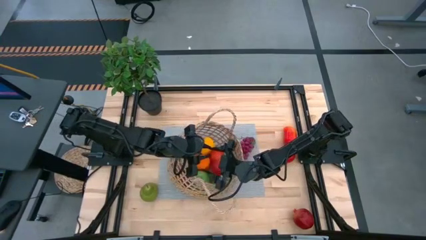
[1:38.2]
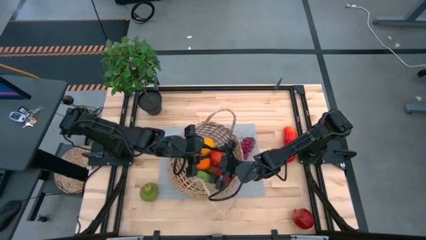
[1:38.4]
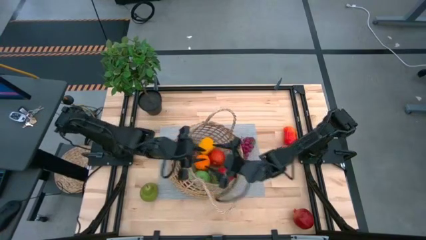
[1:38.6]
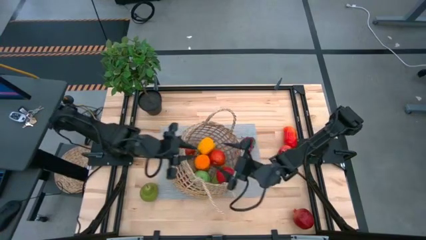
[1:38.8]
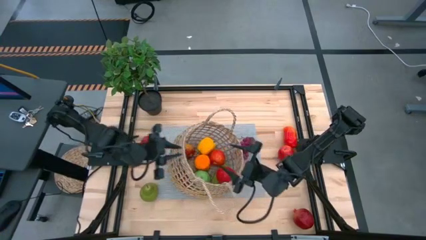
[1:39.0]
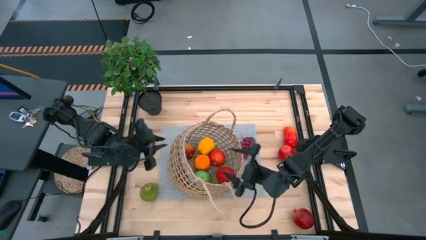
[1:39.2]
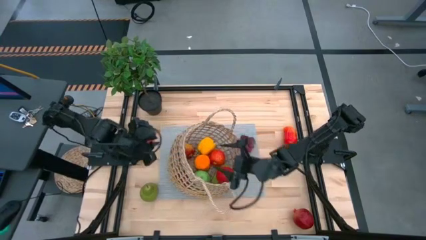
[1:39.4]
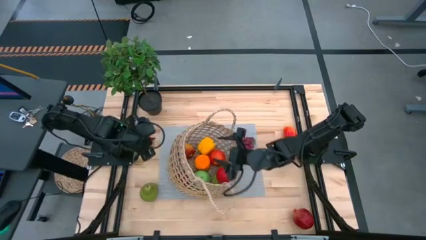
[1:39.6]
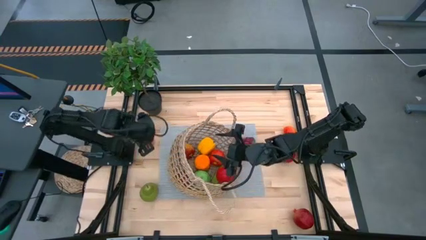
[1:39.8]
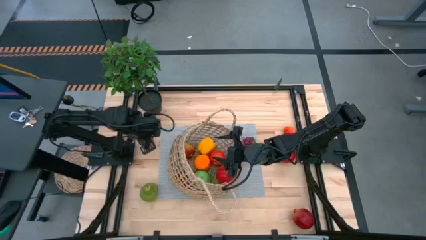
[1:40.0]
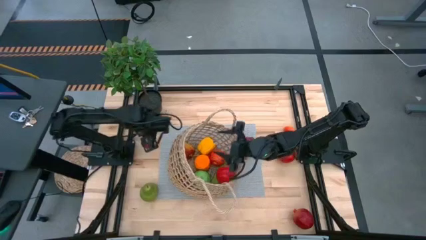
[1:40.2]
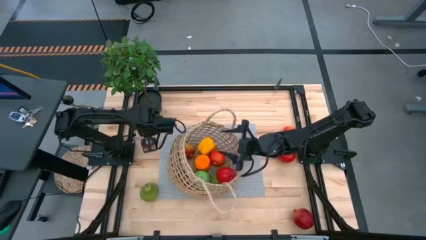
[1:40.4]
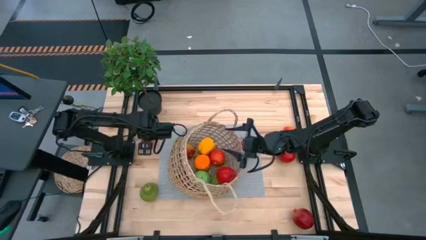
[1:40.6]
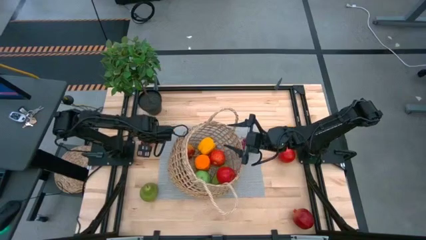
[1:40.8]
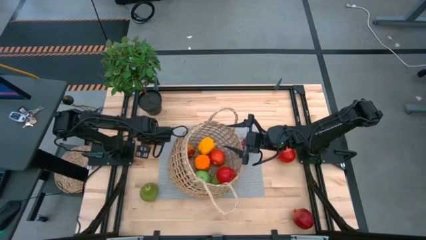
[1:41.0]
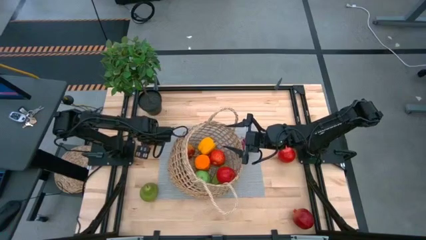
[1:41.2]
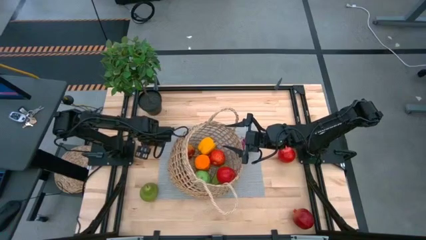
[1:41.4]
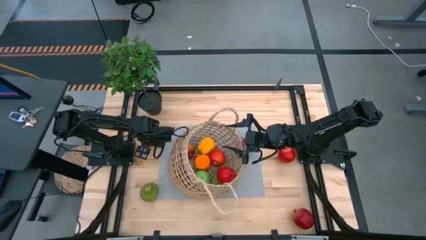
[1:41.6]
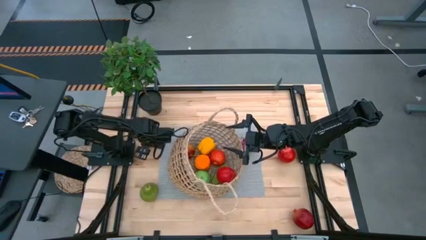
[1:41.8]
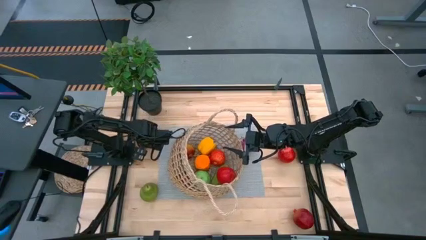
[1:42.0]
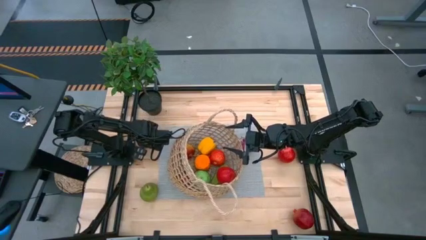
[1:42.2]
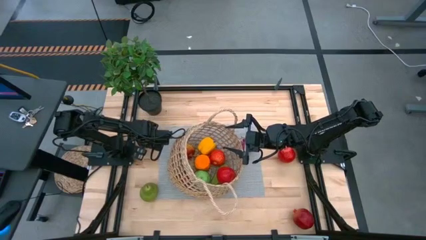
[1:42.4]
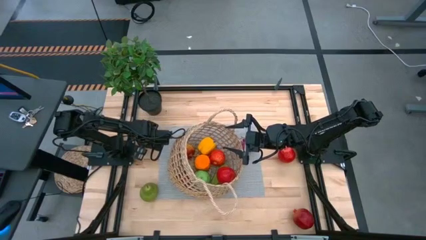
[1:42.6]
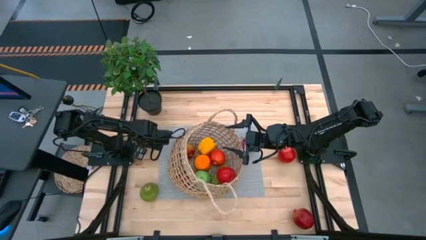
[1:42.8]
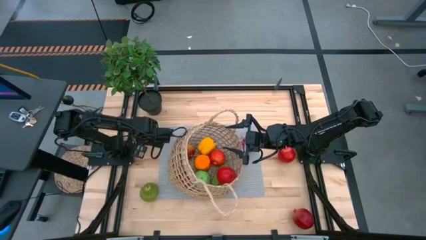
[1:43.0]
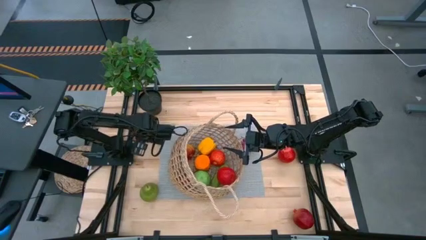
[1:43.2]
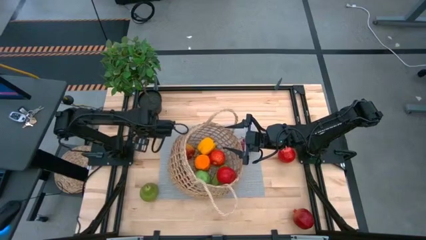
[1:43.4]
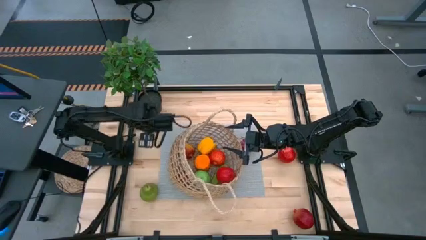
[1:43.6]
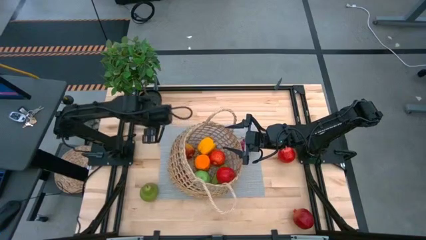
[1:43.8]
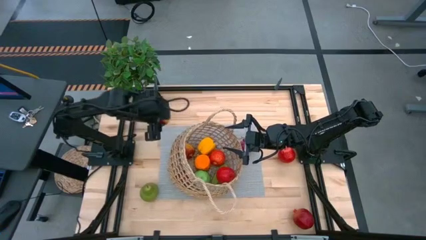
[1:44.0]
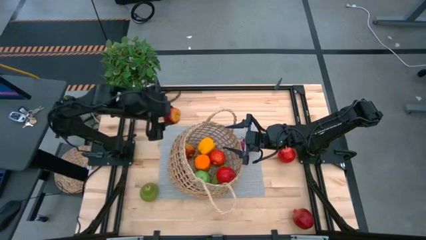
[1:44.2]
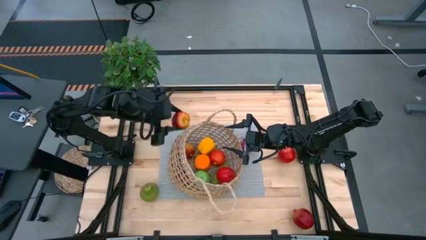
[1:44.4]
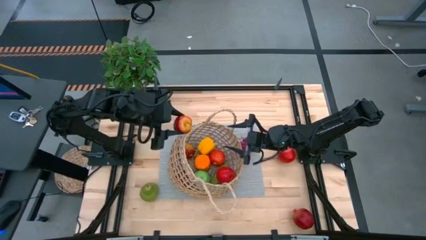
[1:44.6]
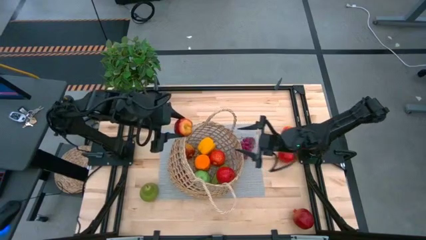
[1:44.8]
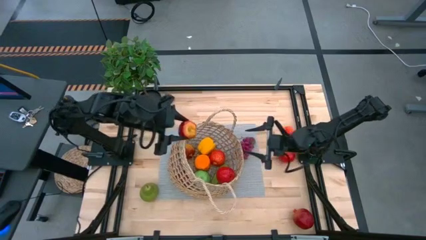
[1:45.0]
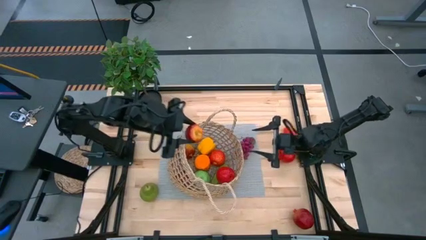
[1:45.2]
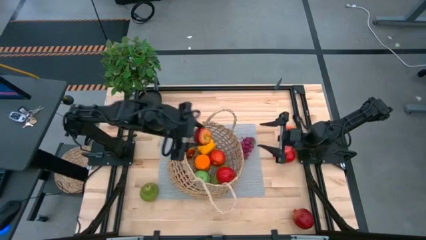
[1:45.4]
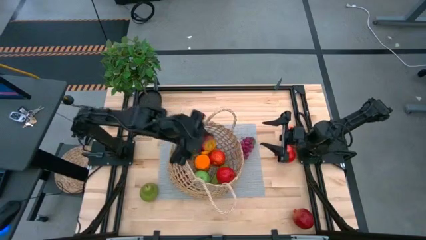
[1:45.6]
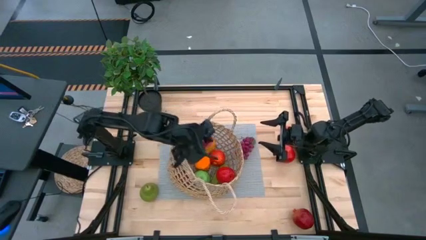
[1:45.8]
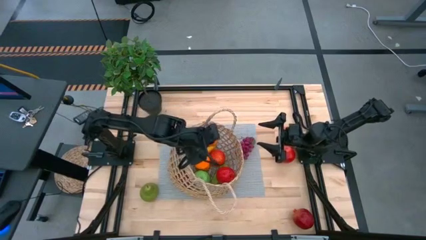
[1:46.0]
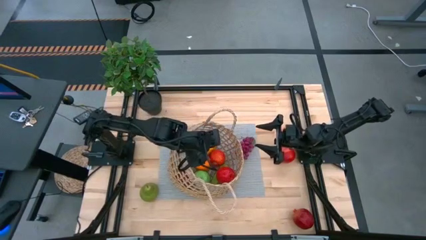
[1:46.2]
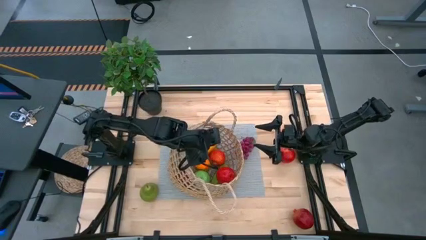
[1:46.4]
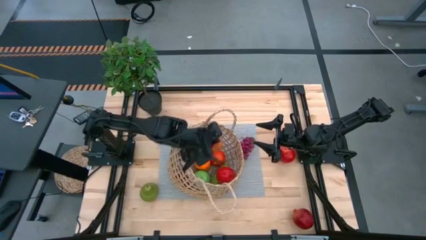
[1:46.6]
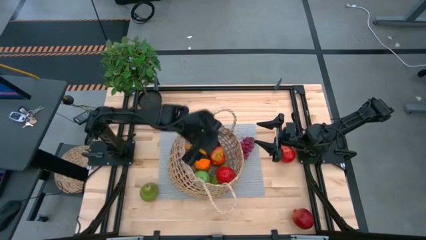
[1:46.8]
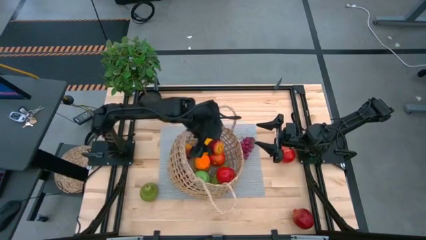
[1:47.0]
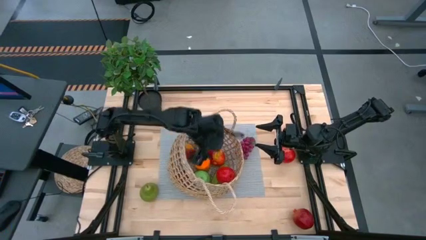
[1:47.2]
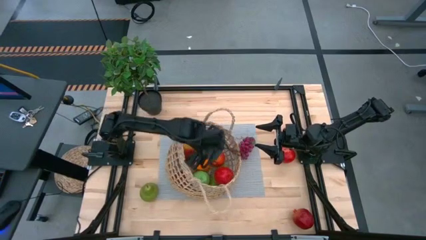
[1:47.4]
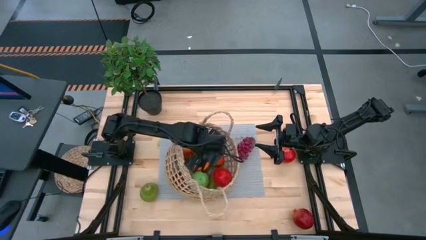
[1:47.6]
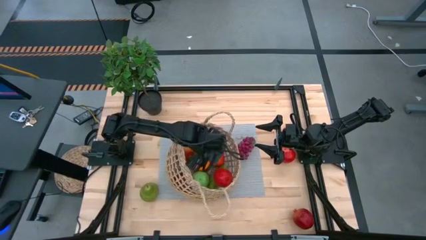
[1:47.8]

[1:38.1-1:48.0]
Task: Build produce basket
Put the red apple into the brown basket

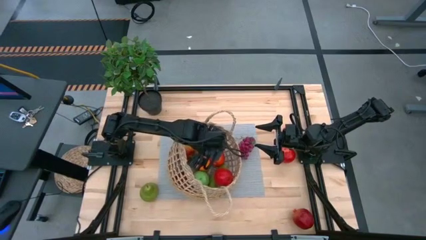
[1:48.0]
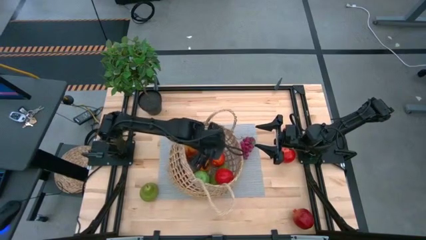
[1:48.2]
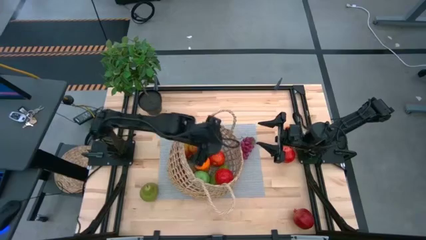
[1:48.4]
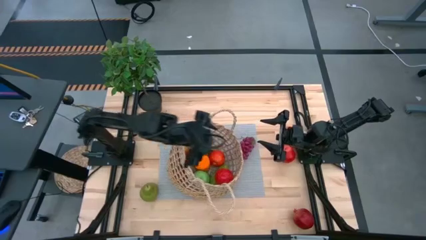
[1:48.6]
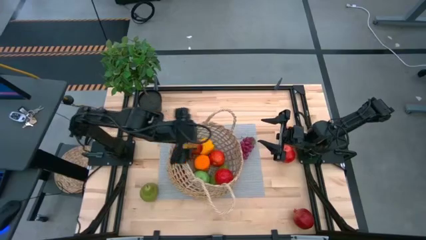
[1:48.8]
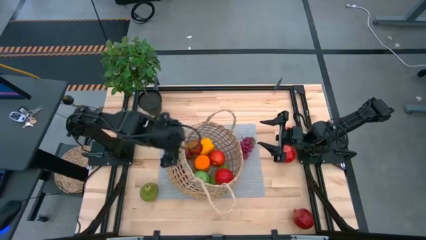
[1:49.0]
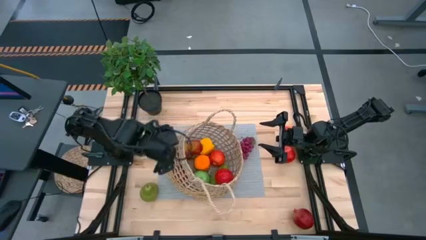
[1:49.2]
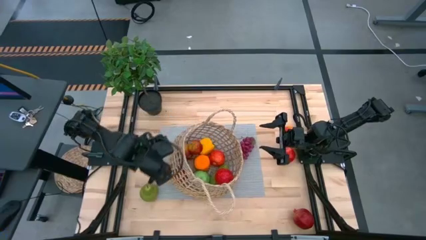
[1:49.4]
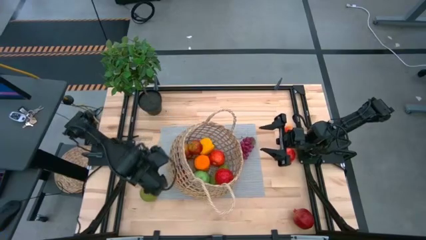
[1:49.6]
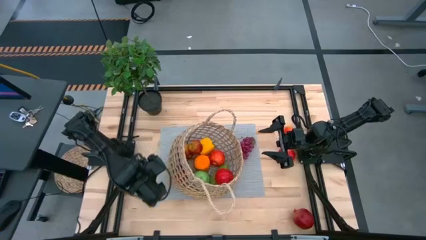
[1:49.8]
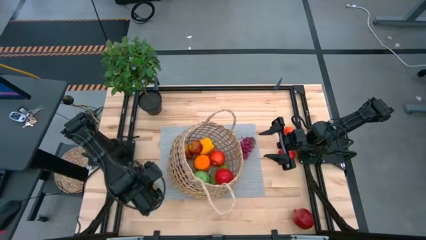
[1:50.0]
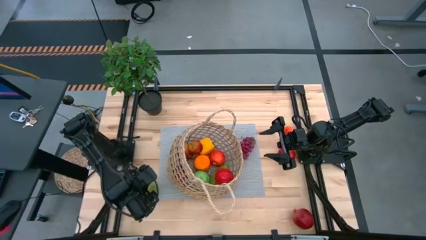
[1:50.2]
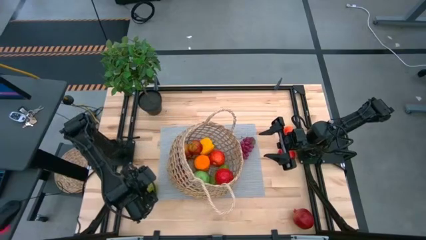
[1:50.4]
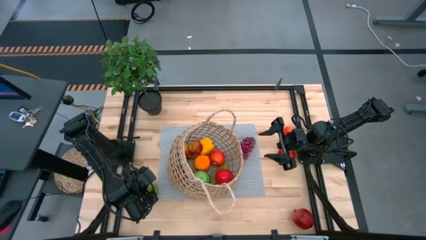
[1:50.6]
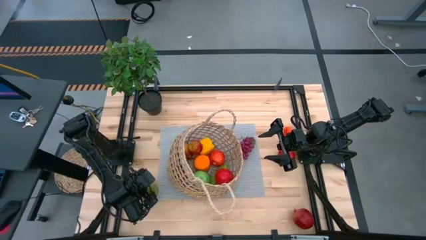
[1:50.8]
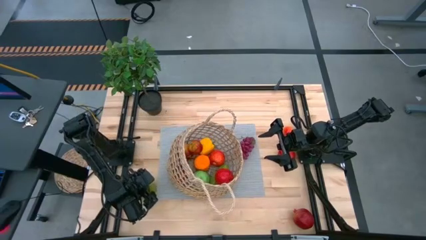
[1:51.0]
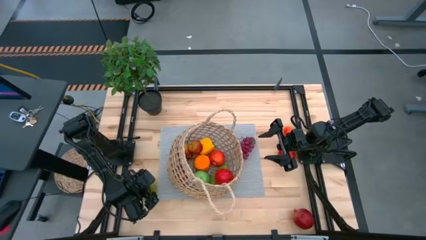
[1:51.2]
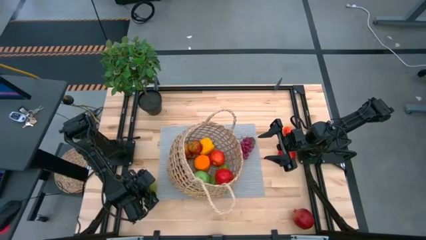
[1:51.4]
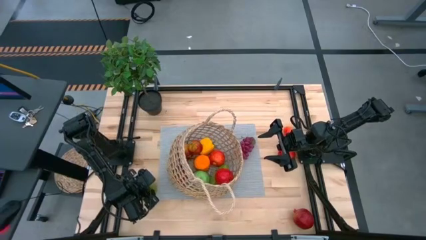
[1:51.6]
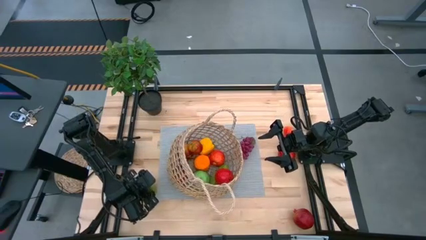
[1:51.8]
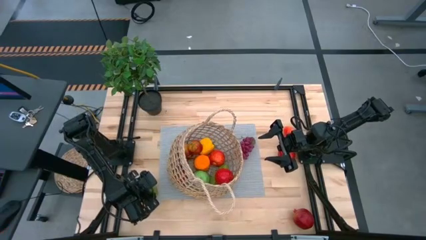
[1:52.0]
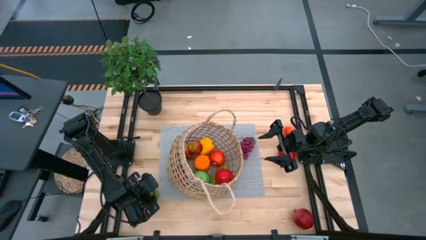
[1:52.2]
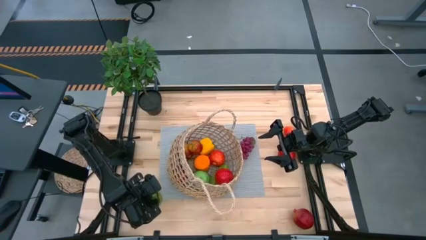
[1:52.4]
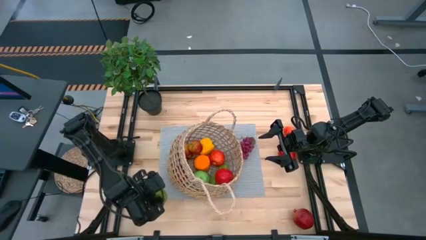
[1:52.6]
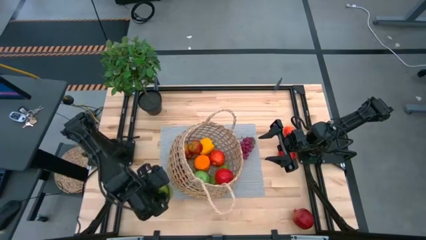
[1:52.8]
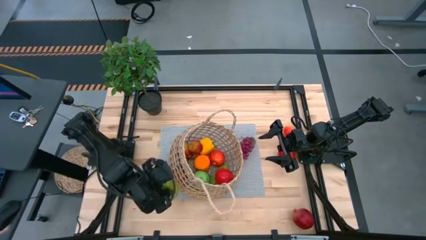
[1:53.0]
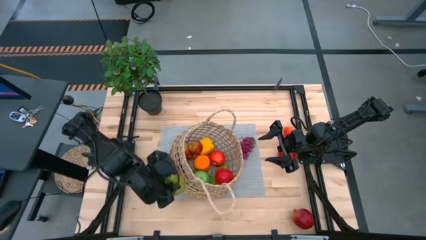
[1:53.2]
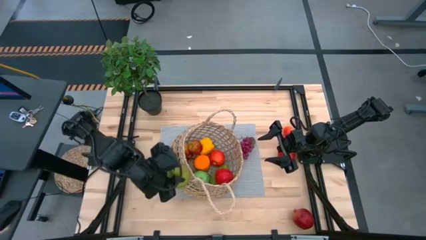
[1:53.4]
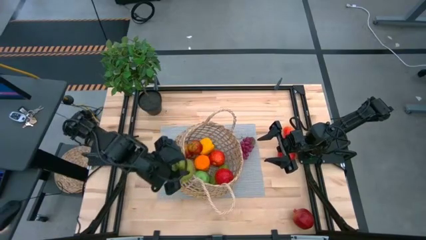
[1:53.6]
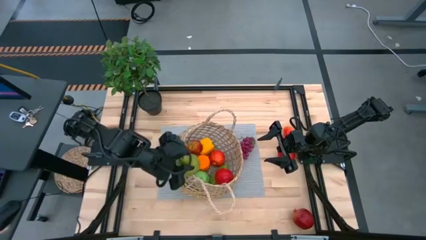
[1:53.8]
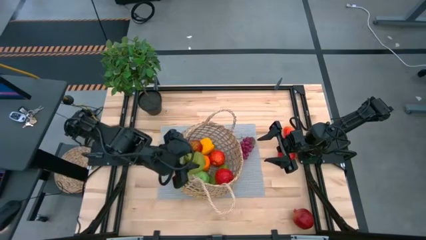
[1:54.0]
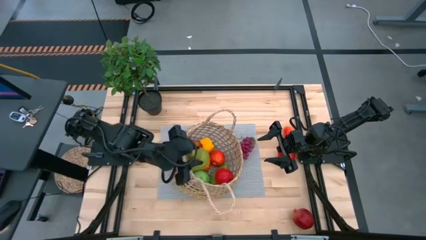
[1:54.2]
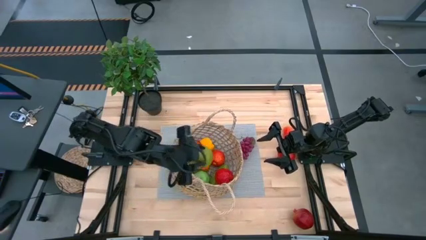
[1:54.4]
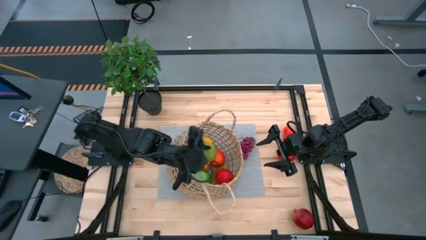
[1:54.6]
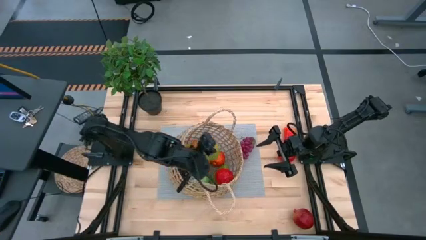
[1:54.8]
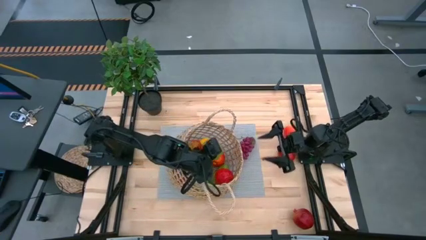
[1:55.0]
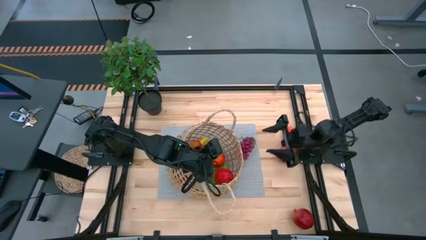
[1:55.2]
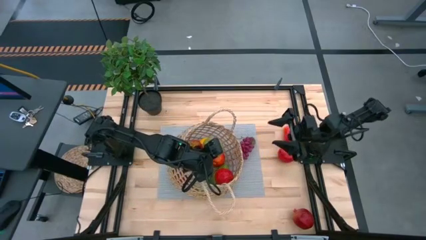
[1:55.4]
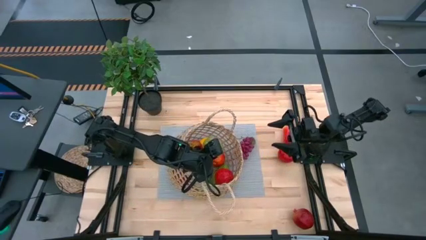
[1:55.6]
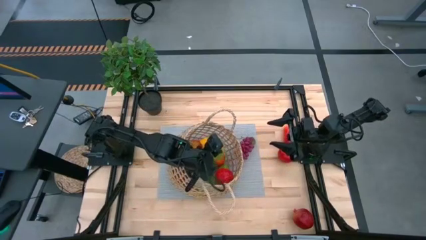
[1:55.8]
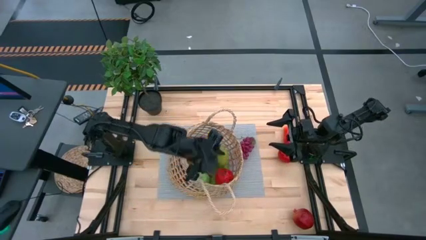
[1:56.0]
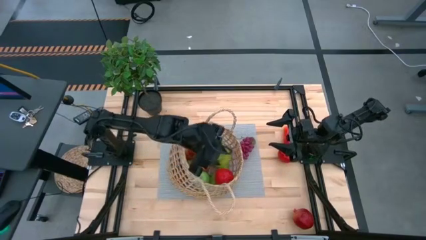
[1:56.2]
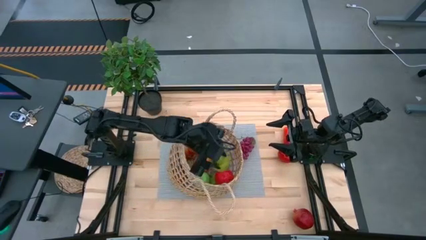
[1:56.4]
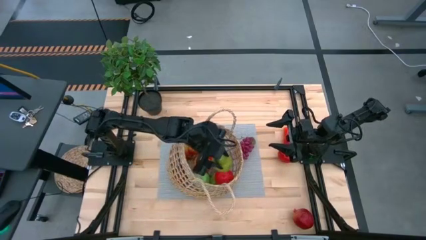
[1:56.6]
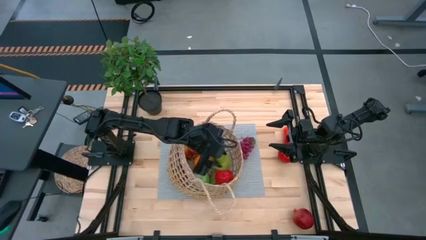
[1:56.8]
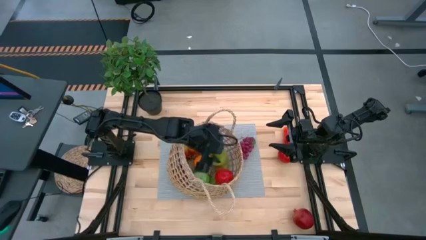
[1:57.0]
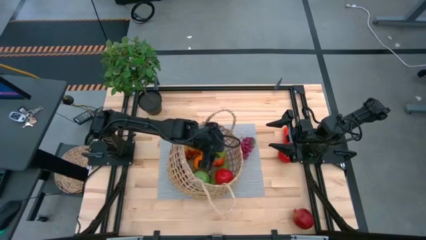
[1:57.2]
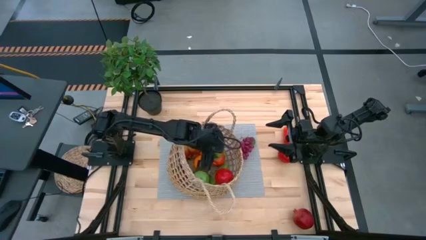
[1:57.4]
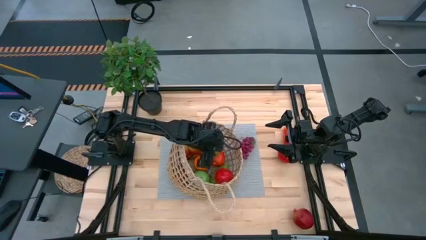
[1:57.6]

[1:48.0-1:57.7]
Put the green pear into the brown basket
